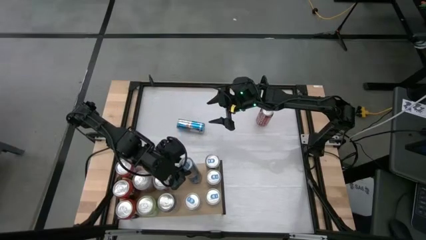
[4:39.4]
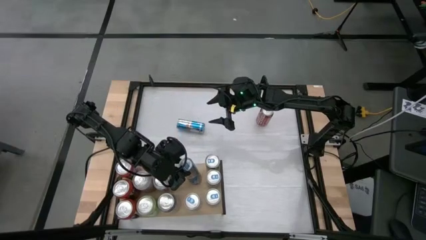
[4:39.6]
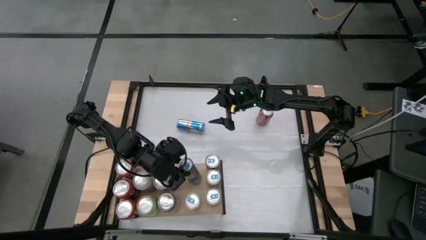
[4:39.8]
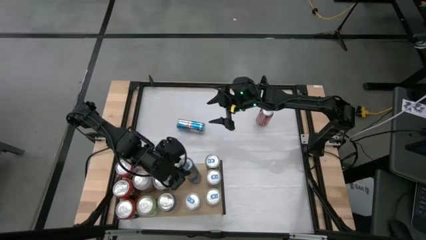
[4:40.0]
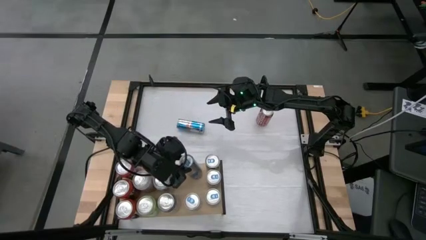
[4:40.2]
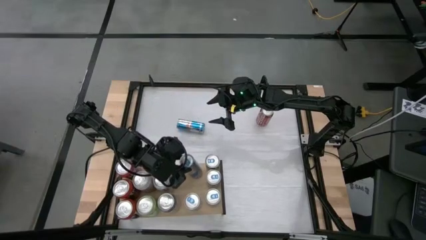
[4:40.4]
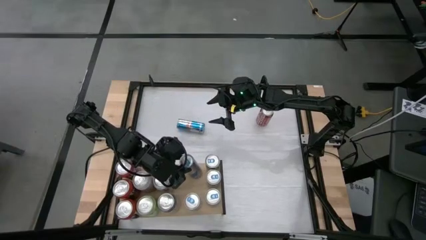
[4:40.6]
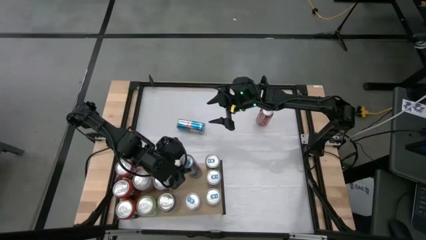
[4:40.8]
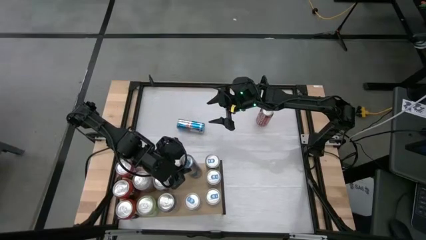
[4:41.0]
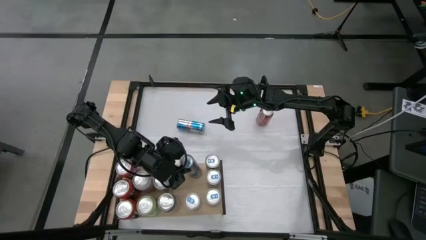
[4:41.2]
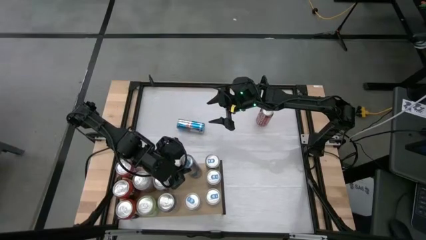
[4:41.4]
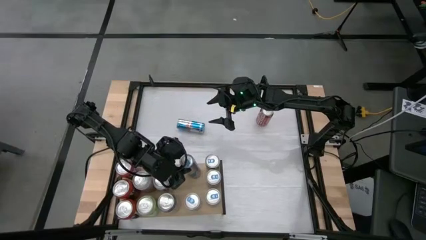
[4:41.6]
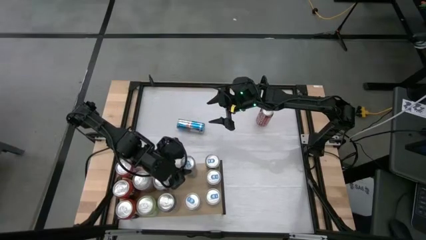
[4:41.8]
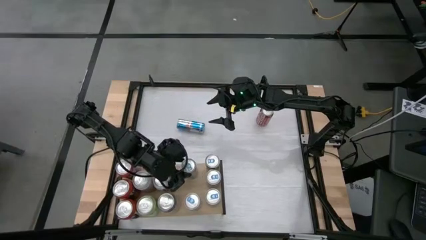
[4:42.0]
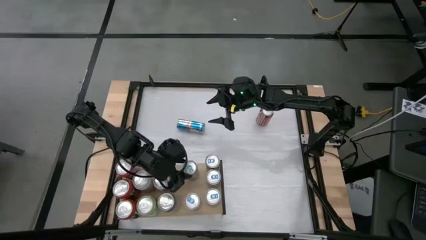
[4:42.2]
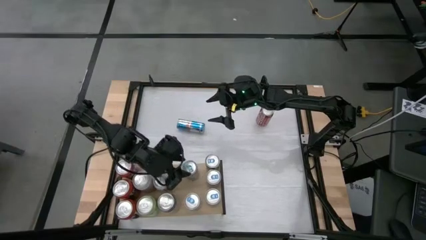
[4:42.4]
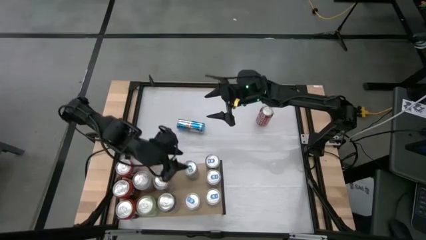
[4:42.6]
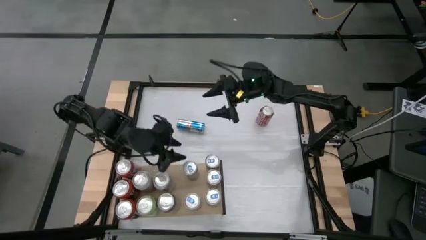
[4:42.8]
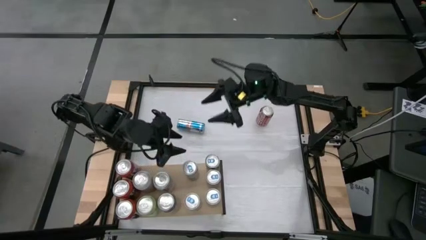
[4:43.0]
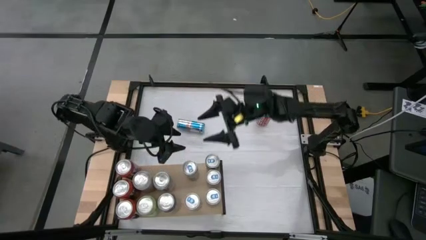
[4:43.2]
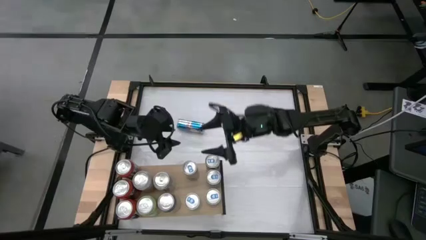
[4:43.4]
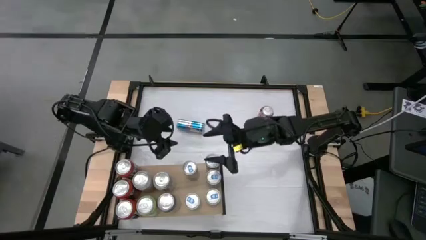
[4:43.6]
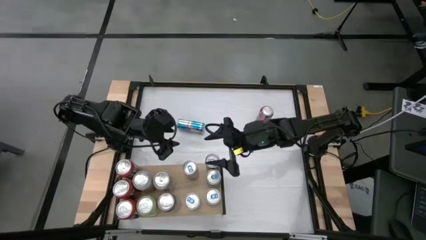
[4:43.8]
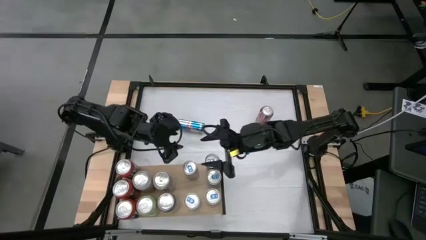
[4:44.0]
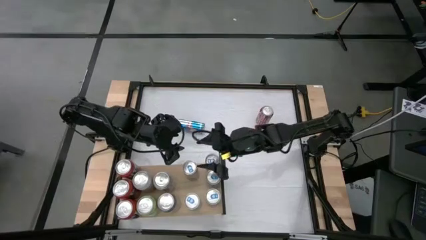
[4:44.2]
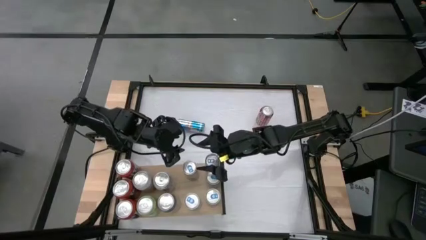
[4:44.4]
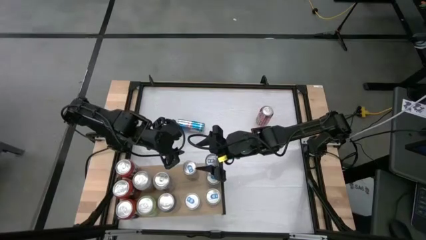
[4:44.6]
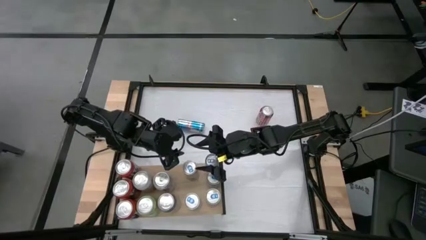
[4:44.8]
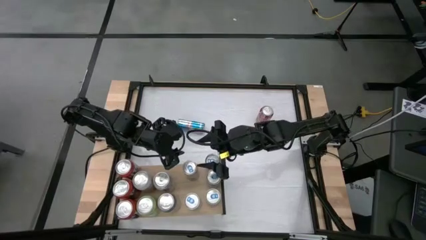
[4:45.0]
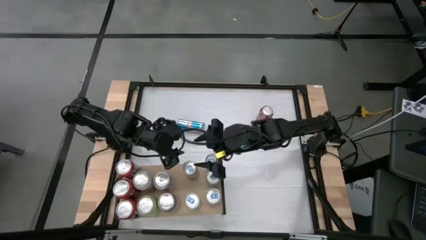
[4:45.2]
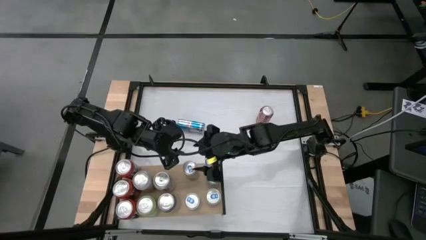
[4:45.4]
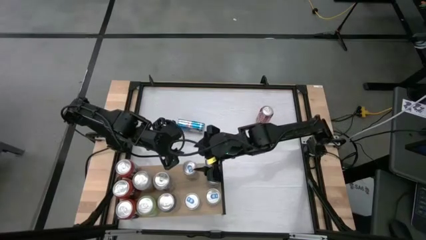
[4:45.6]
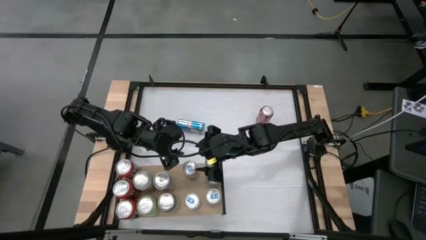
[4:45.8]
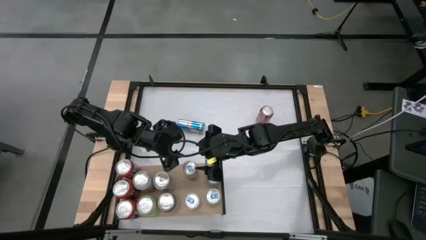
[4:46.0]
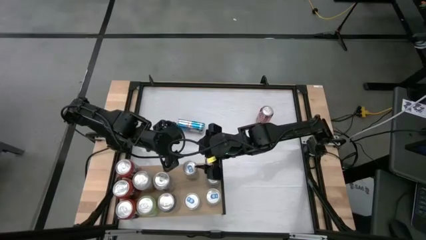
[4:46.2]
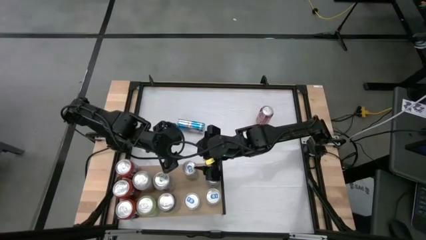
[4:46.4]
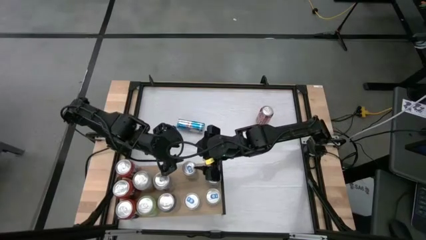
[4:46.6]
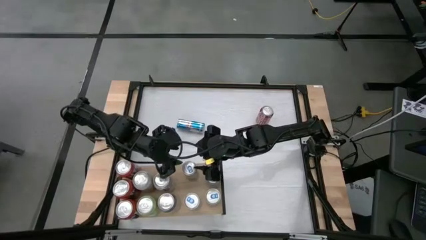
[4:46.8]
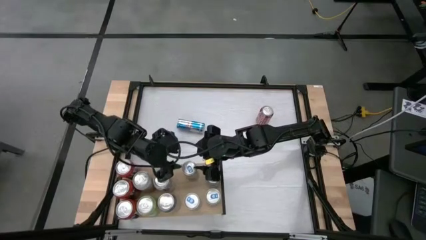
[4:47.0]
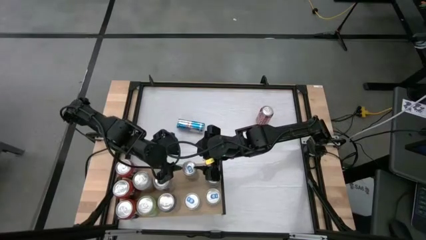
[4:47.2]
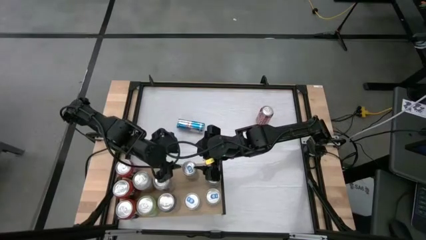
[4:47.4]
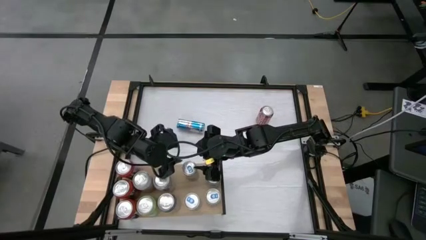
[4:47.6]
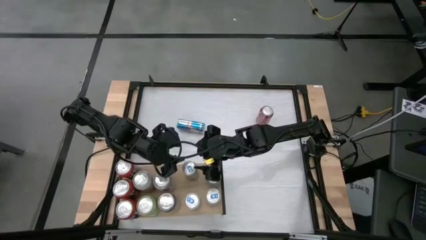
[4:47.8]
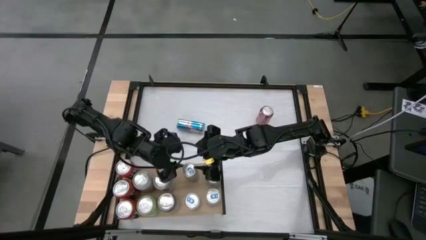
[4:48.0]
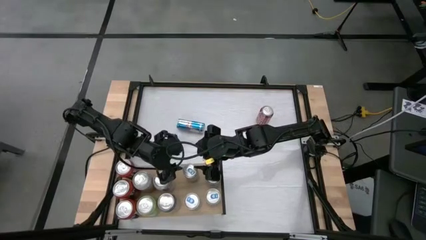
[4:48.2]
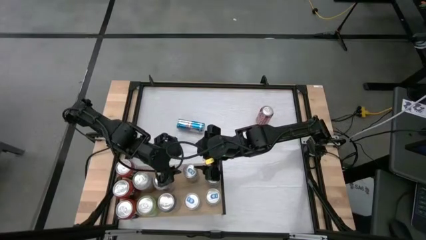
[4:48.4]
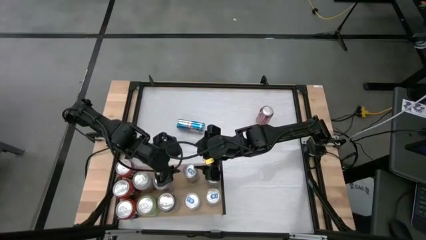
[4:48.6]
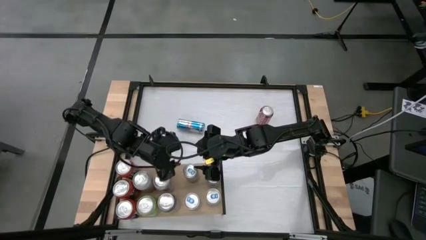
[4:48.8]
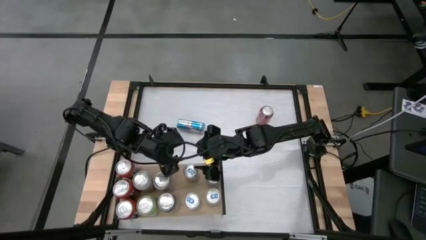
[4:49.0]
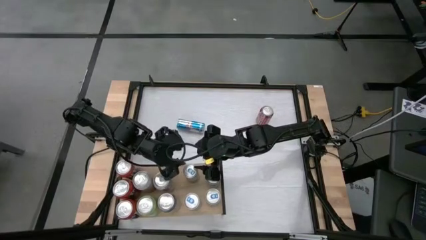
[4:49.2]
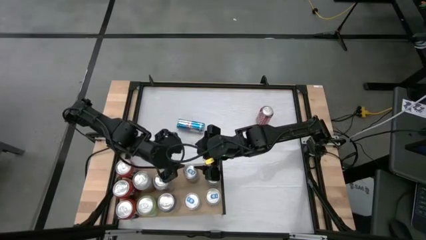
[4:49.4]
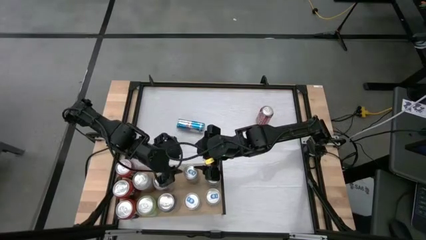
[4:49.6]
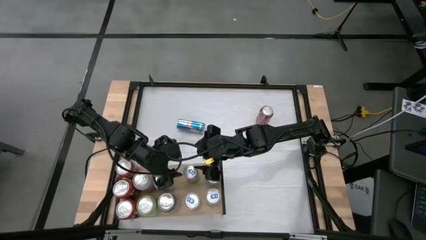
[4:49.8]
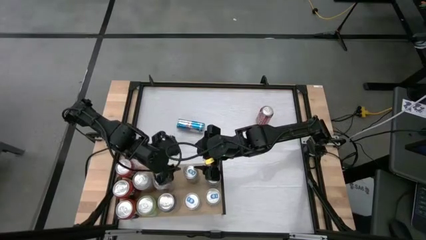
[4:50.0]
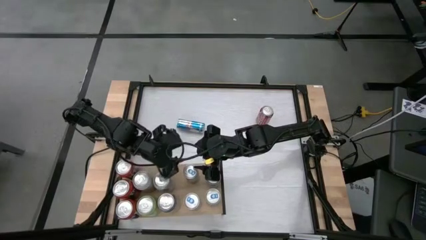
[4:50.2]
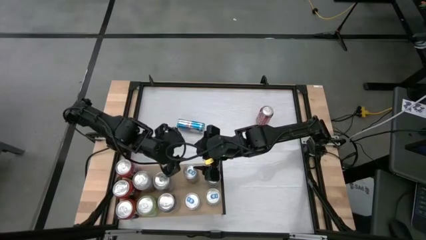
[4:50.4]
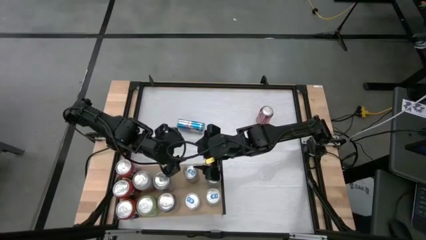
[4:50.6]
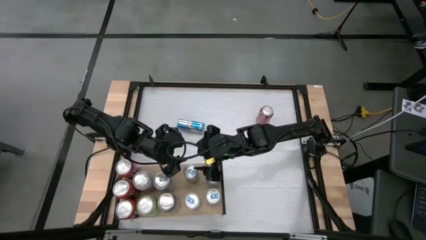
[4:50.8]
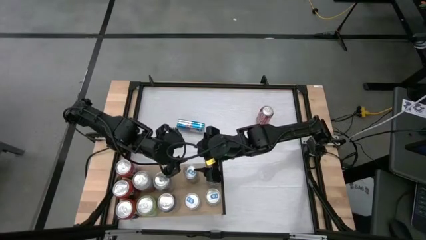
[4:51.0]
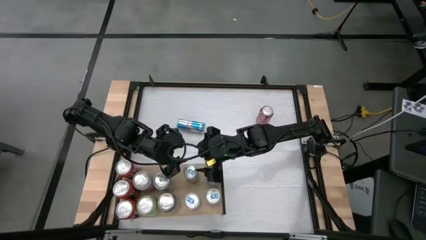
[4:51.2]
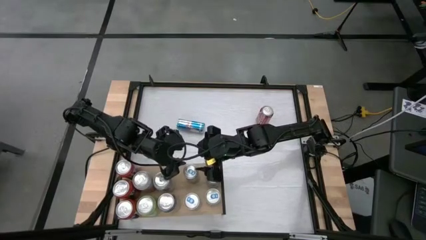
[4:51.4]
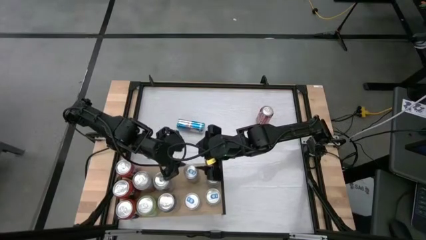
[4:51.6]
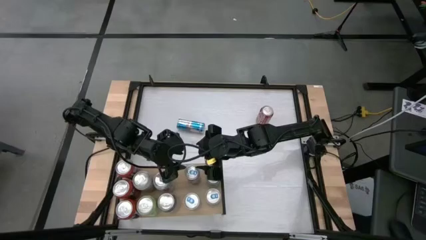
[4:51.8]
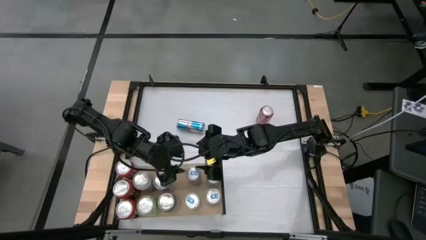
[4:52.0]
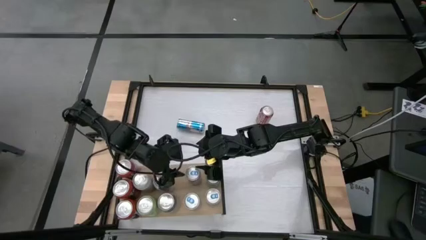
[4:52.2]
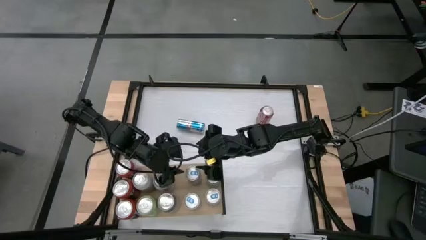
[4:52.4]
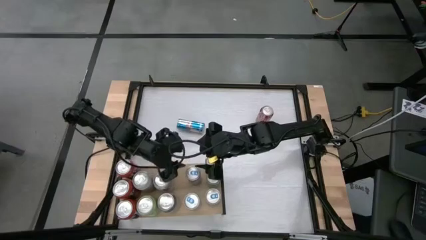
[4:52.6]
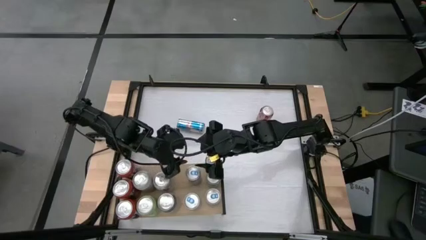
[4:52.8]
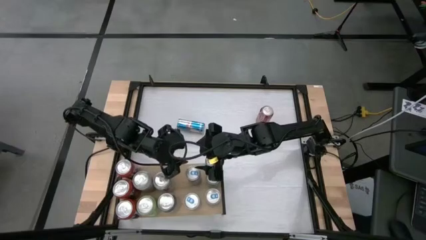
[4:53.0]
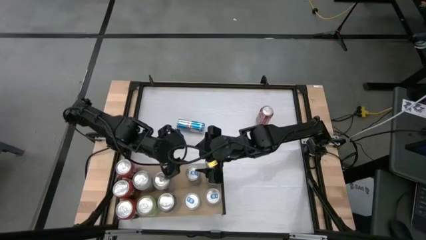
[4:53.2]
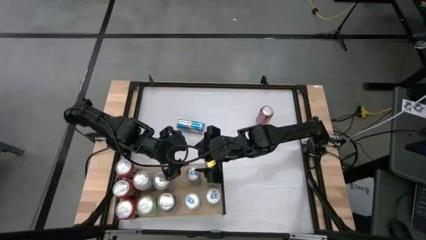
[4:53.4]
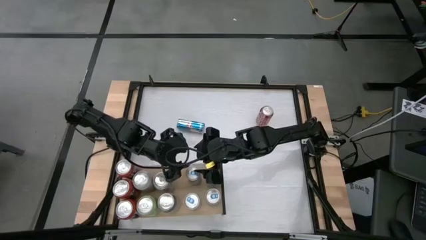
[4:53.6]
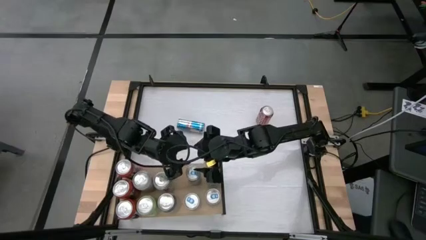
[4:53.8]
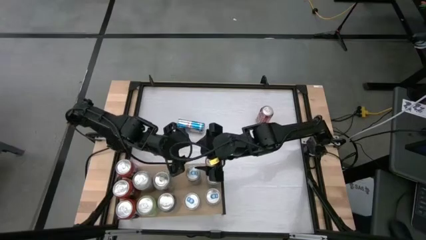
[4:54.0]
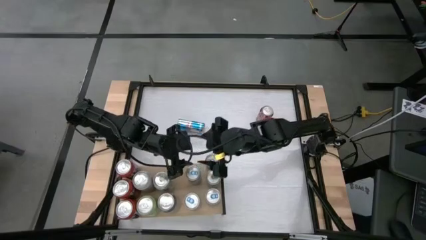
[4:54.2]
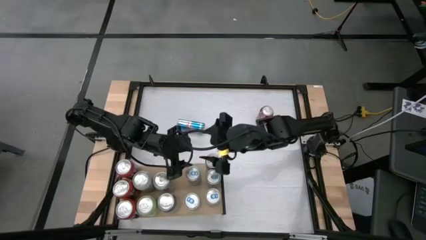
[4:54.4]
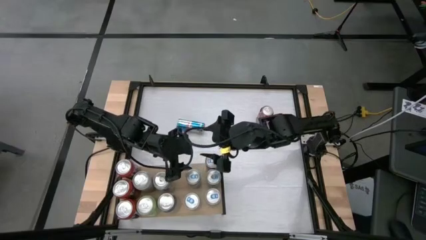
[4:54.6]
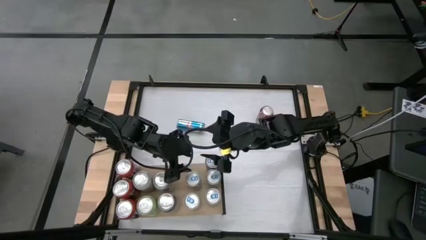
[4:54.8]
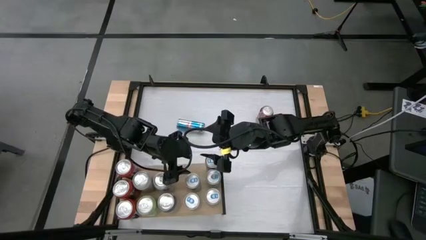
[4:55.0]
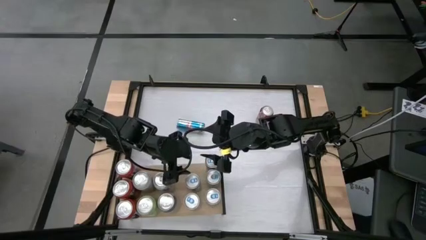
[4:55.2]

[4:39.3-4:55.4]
Task: Place canned beverage on shelf
Put the blue soda can on the shelf aligned with the other blue soda cans

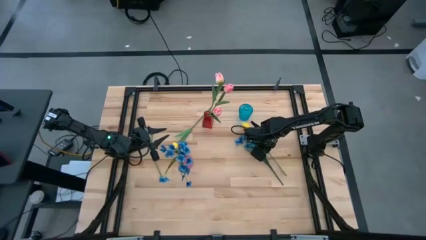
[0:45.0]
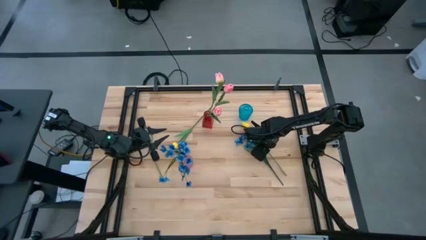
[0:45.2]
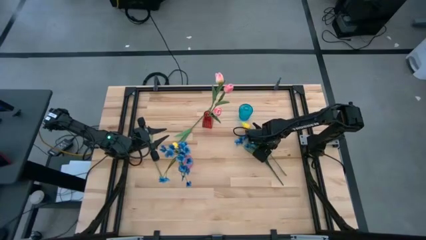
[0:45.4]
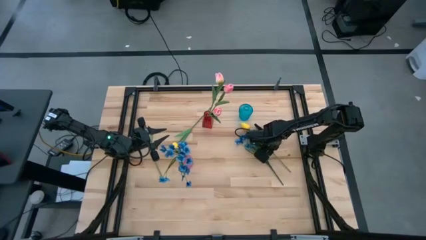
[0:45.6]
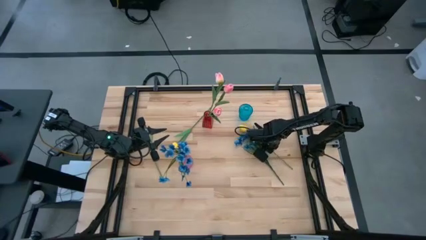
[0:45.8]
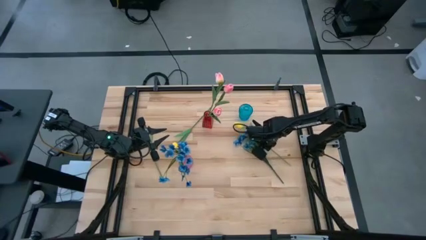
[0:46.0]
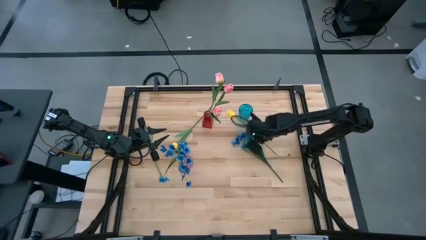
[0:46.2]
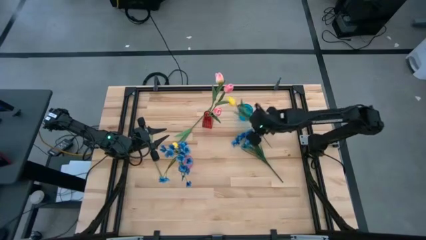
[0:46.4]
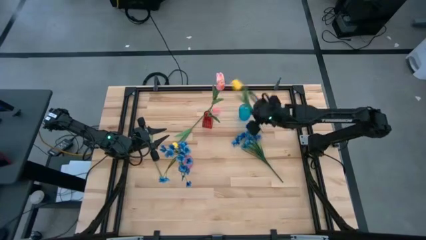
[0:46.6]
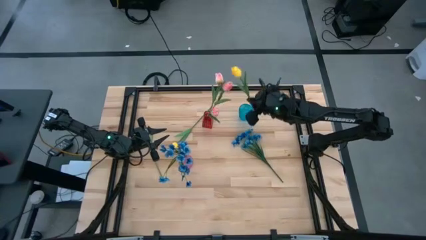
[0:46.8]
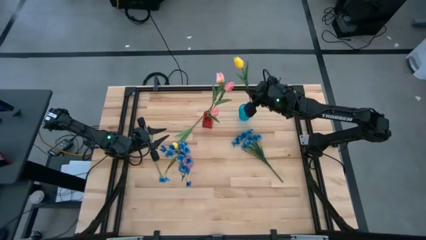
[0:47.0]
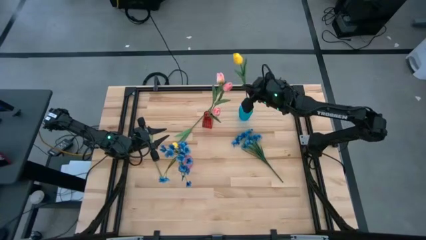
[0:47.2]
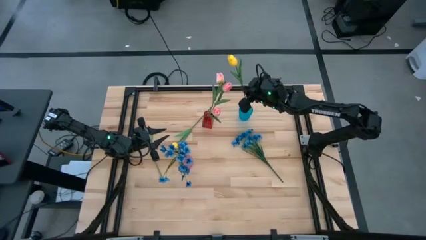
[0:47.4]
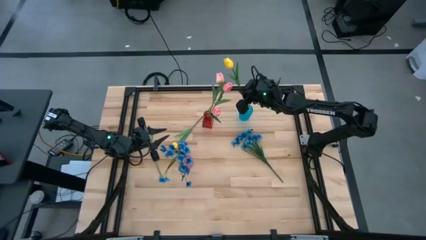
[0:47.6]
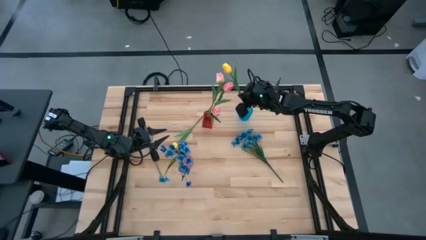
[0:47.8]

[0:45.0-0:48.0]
Task: Sort flowers into vase by color
Put the yellow flower into the blue vase
